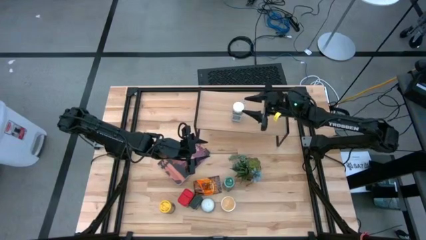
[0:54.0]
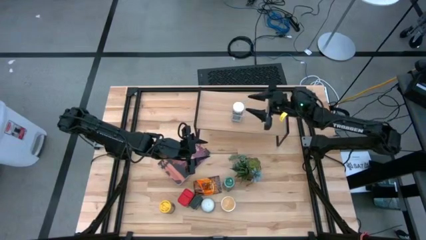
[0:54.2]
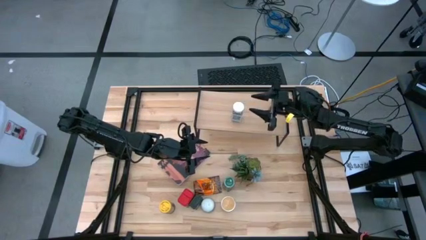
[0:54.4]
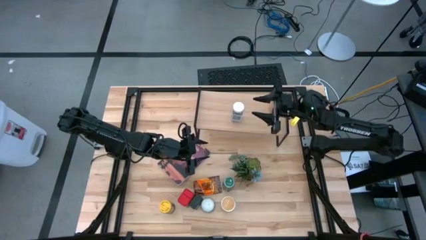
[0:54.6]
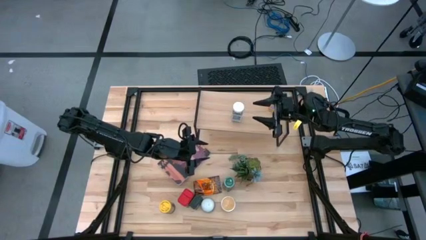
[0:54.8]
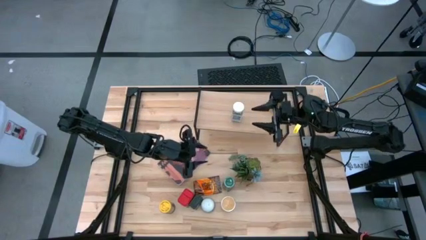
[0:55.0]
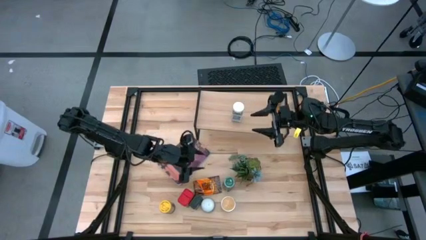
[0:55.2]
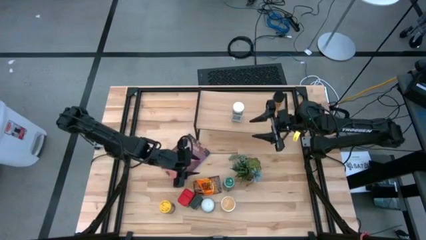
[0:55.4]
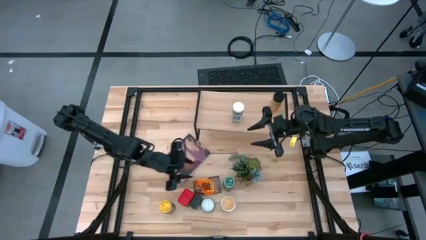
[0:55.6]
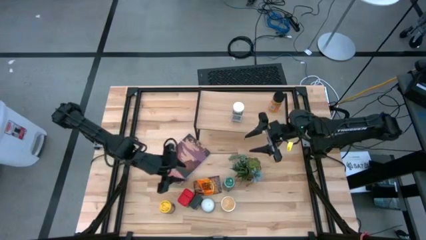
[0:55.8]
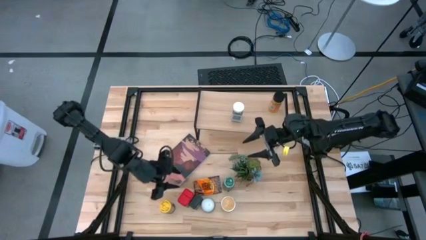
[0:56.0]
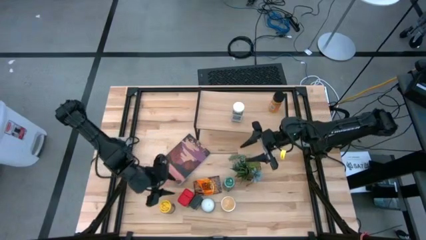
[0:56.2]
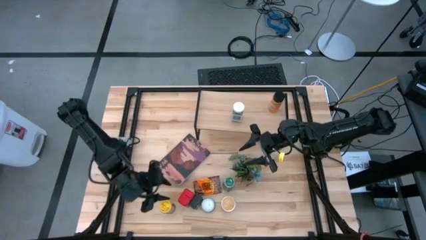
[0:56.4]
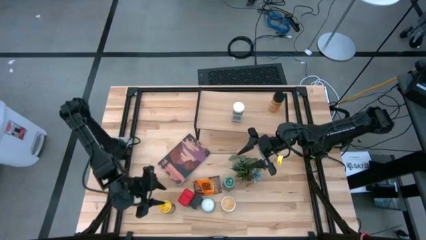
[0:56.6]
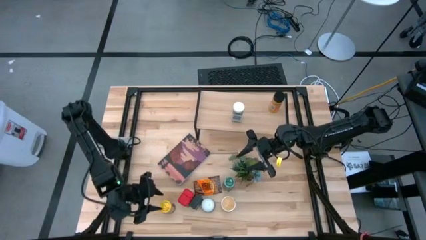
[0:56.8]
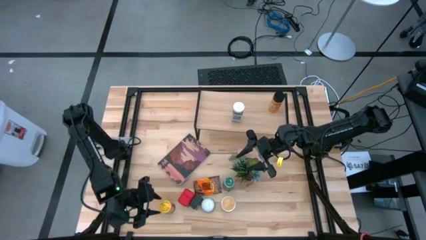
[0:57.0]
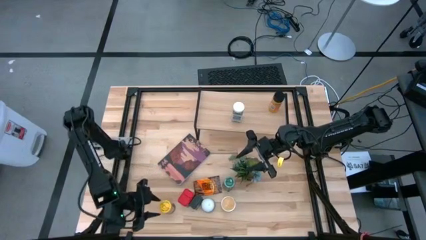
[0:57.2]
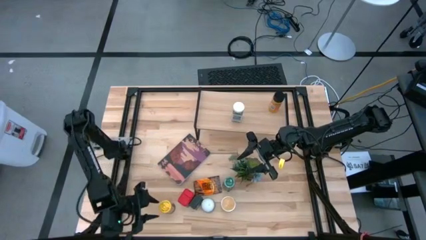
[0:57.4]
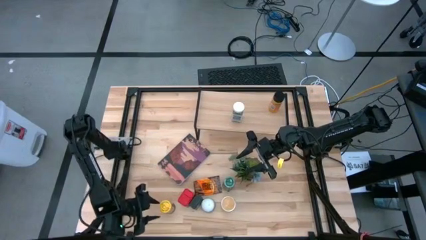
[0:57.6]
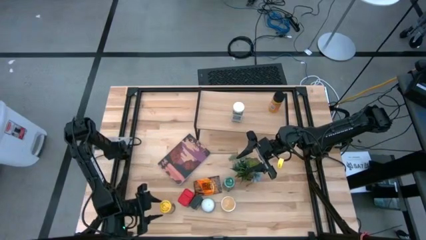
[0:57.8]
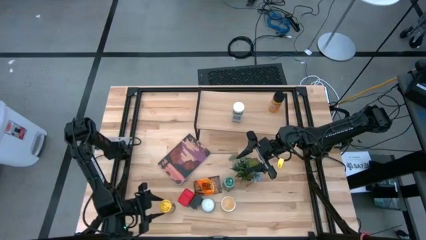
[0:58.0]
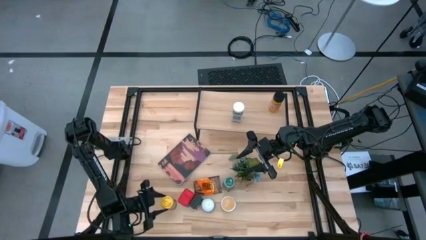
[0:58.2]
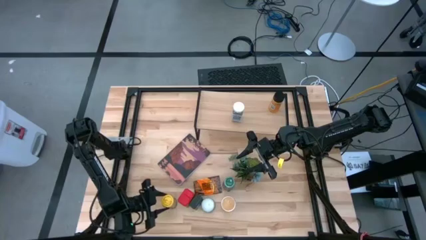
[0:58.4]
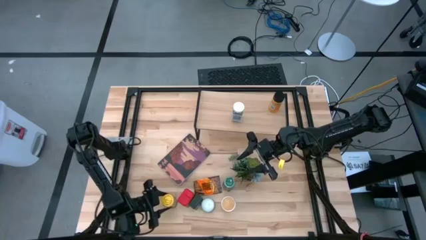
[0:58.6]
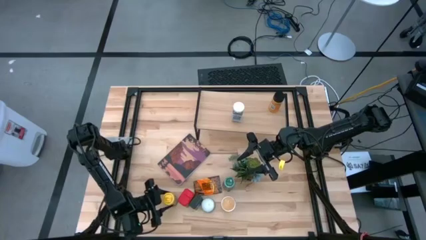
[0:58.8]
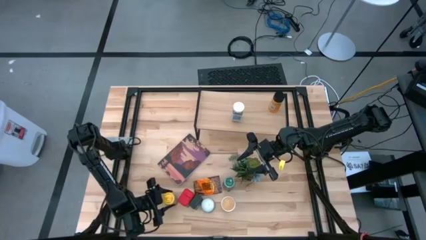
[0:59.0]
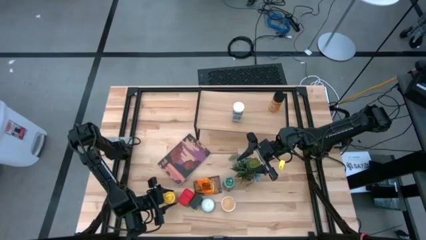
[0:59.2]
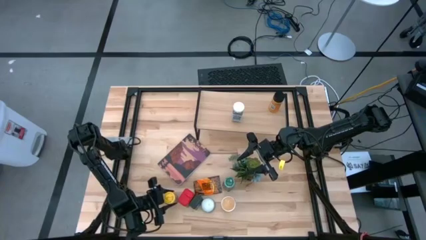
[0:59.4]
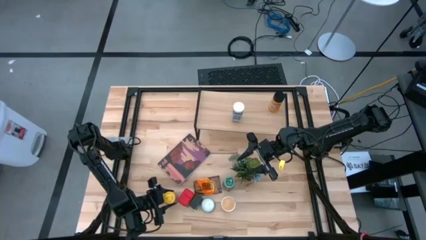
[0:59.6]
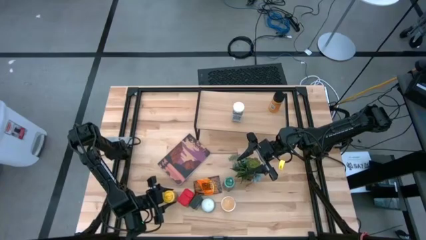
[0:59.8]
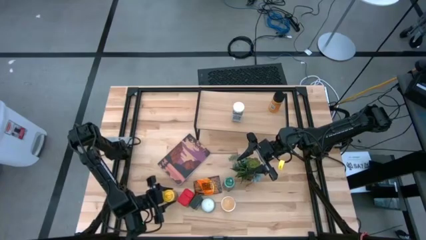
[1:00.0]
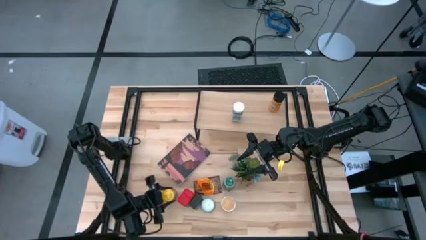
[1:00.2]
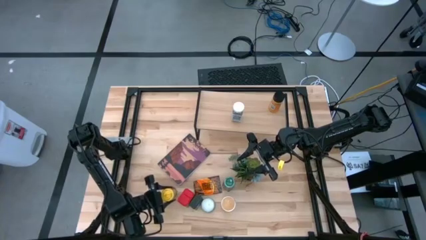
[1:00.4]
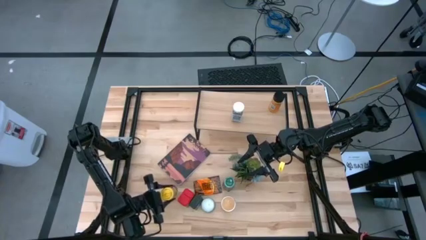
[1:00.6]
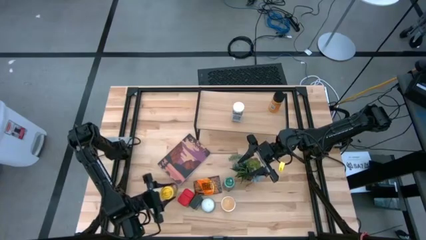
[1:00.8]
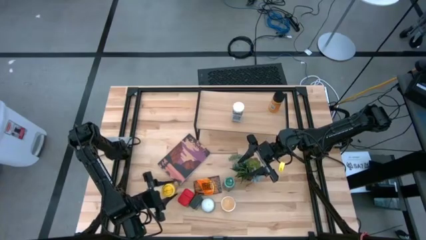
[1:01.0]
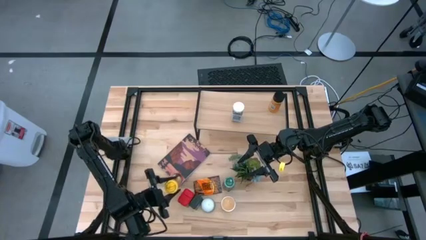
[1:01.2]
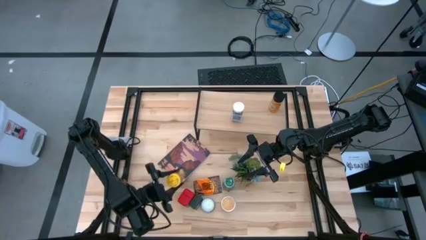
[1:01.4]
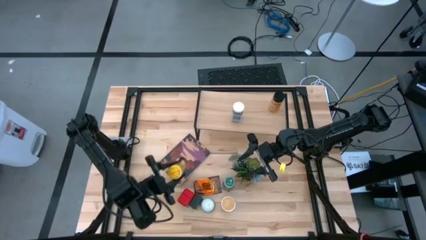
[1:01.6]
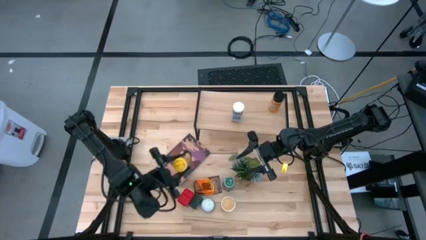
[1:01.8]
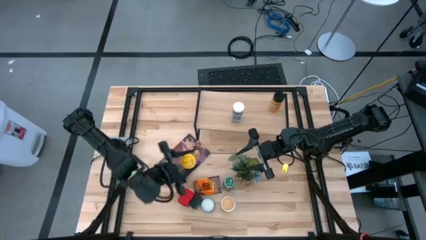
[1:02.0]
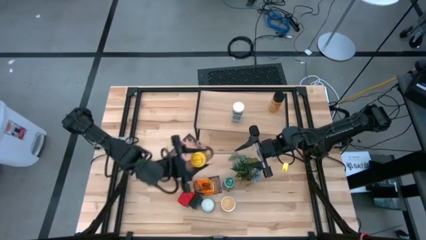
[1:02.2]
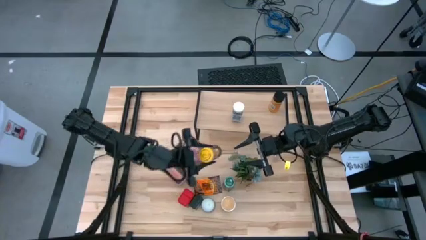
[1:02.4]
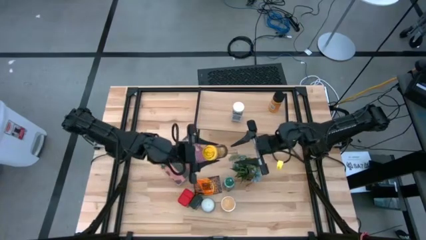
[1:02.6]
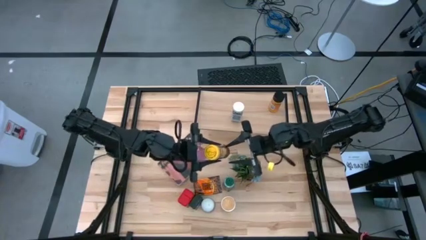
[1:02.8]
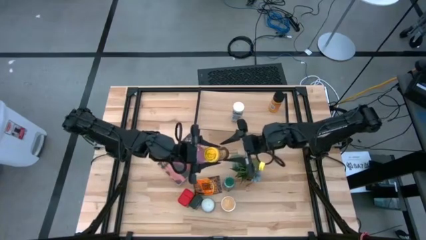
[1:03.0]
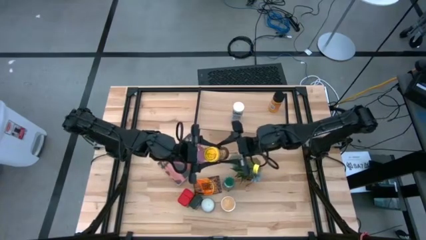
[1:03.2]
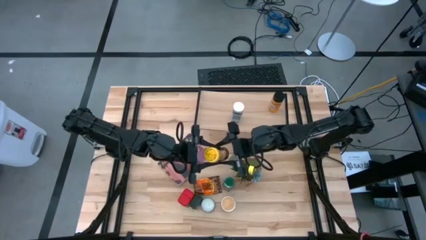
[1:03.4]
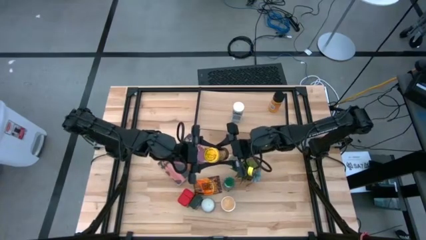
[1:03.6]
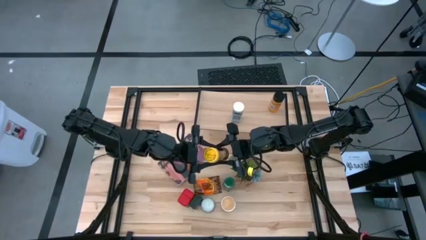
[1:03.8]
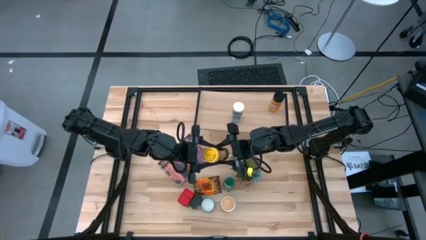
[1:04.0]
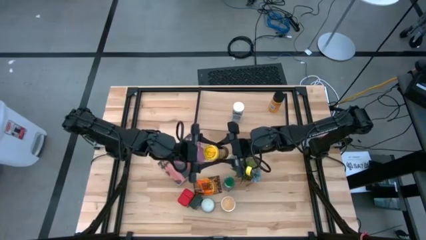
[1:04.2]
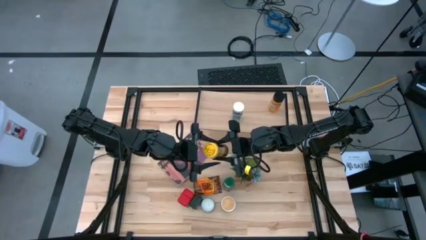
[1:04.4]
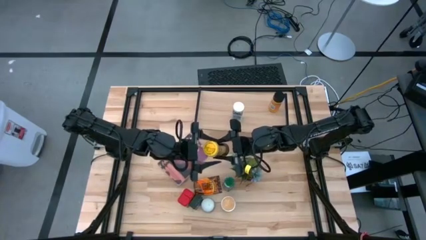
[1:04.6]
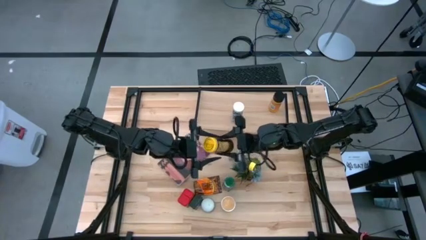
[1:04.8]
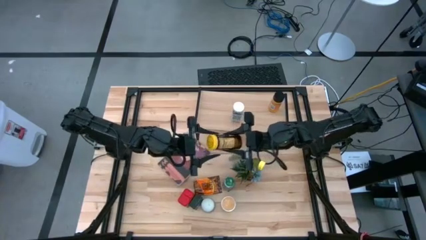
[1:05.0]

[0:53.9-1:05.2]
Task: Shelf spices
Put the yellow seasoning bottle on the shelf

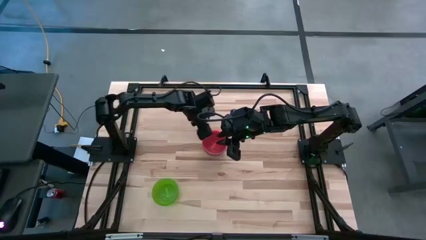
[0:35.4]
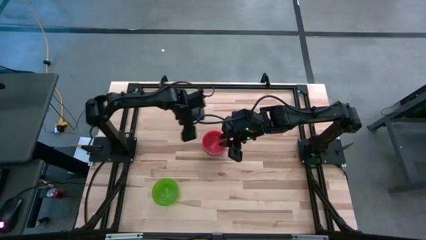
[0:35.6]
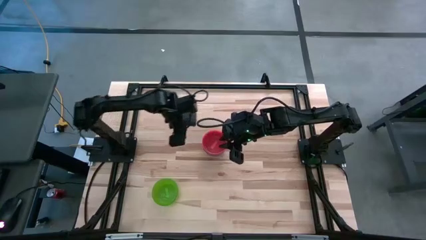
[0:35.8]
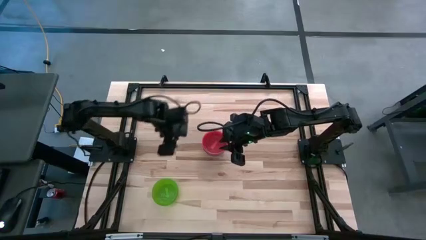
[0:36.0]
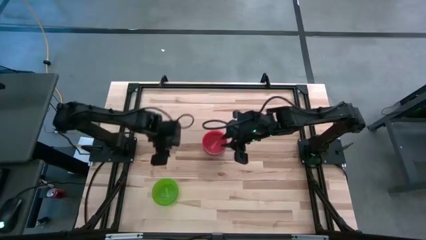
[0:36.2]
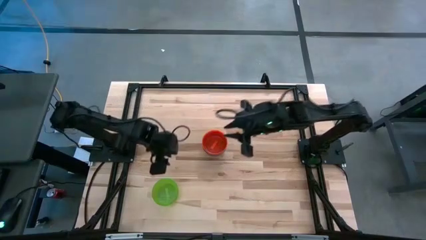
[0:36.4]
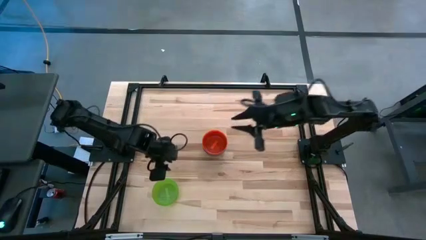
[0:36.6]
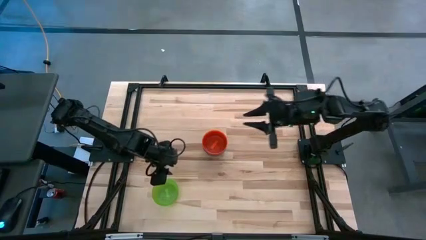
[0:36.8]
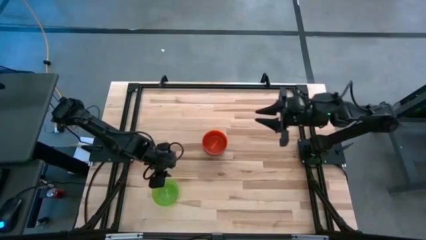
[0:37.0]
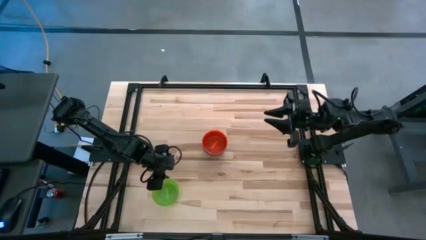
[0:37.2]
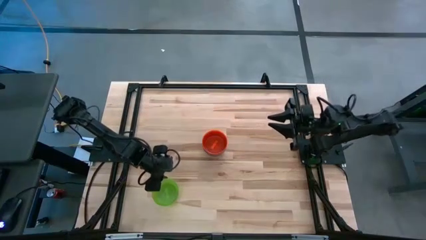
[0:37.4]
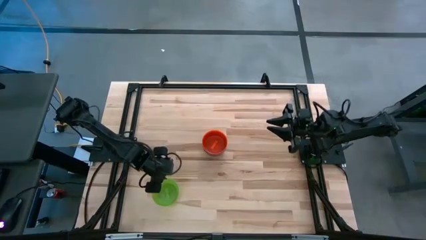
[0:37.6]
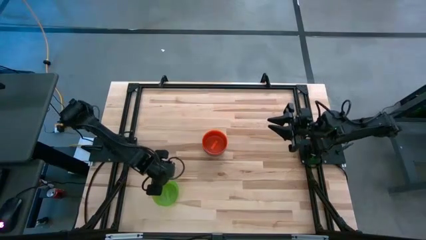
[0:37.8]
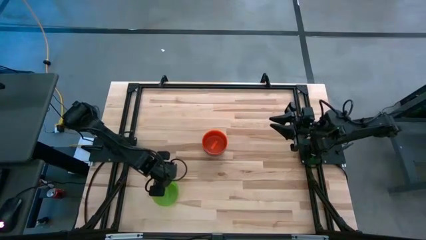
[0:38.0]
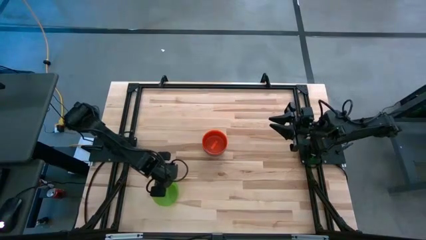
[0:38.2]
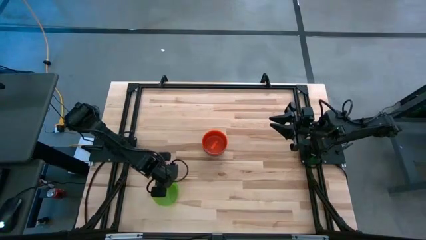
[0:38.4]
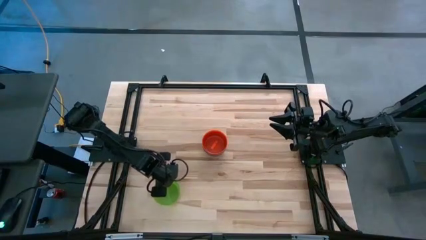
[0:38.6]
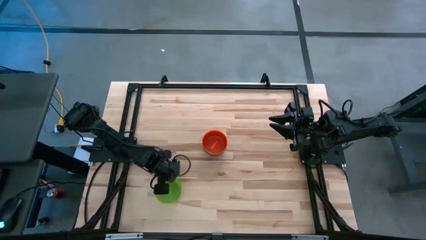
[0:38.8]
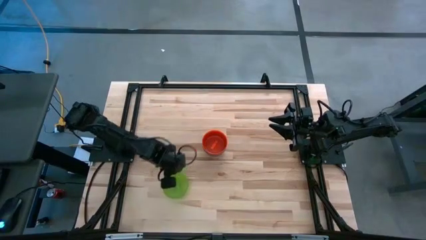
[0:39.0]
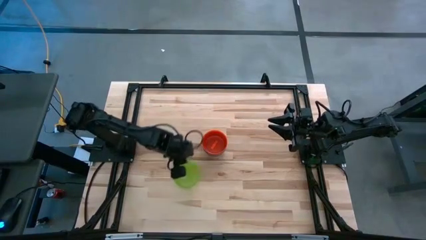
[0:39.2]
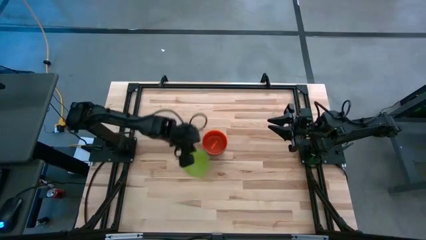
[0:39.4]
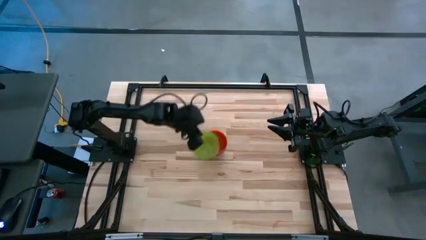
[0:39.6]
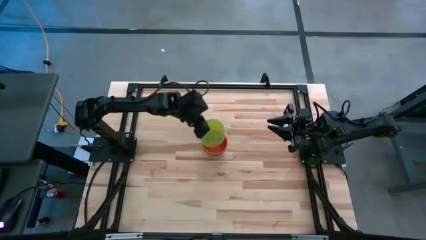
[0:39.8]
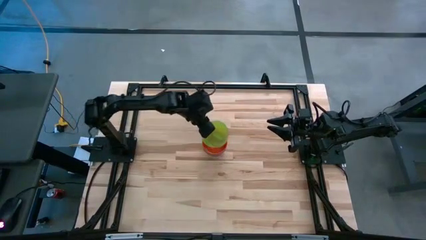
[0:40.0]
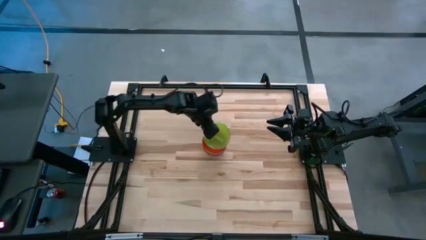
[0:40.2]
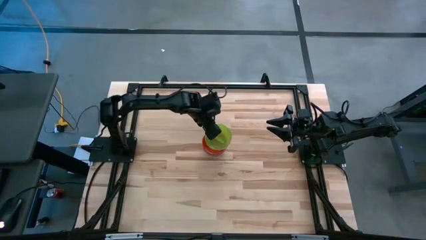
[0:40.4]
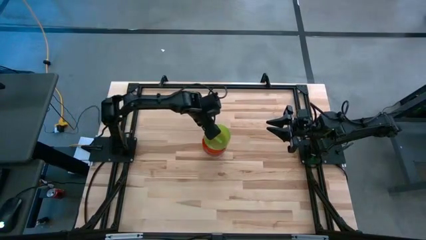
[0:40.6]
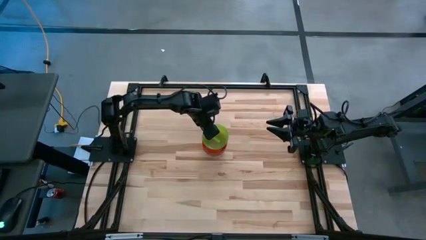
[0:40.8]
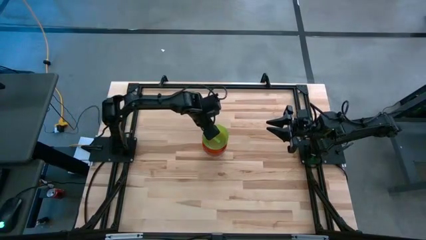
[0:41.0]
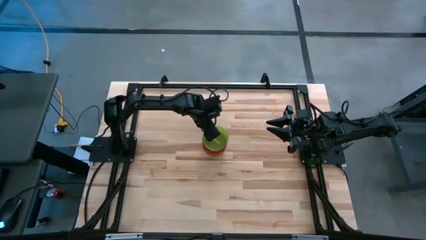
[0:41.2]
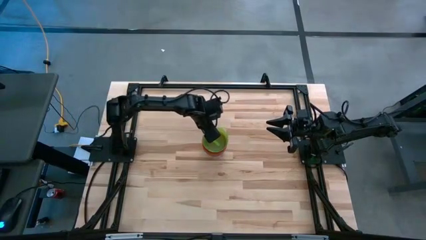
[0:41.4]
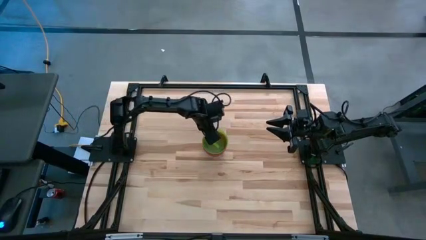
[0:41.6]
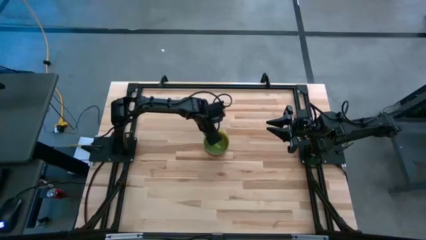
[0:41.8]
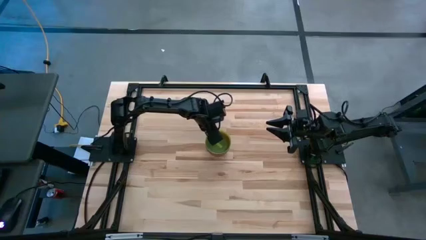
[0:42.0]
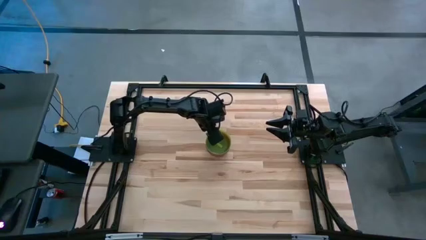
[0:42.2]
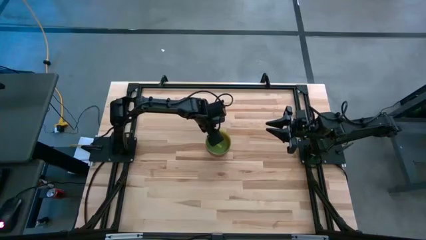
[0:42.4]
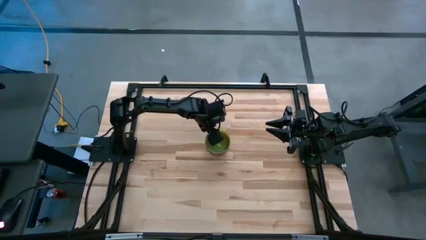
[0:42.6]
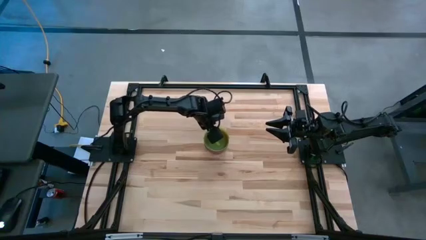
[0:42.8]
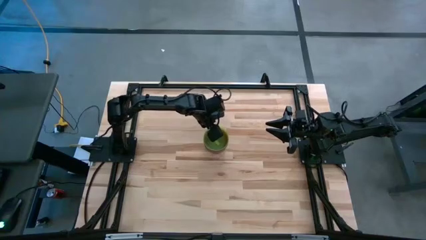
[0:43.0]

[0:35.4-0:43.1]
Task: Nest bowls inside each other
Stack the green bowl on top of the orange bowl
